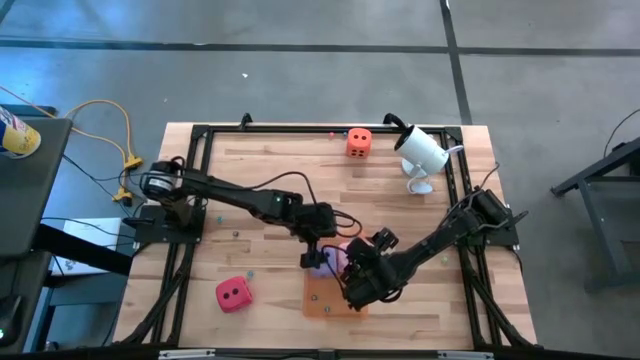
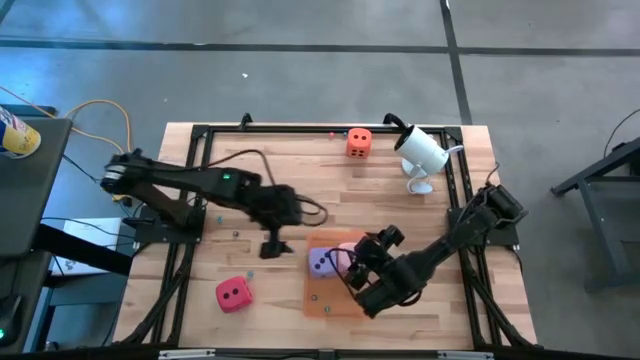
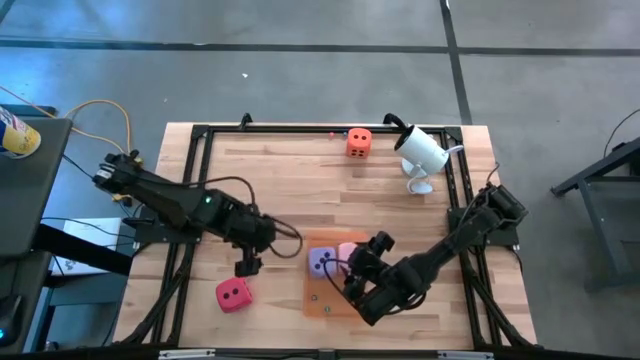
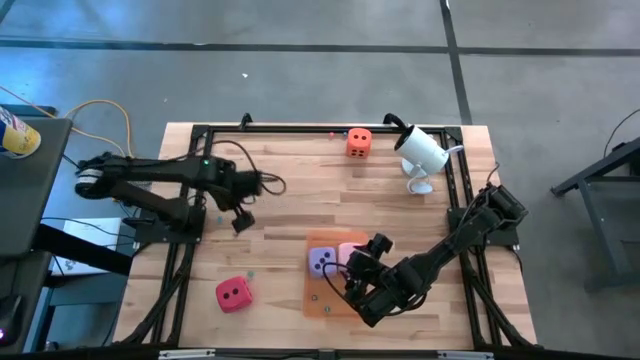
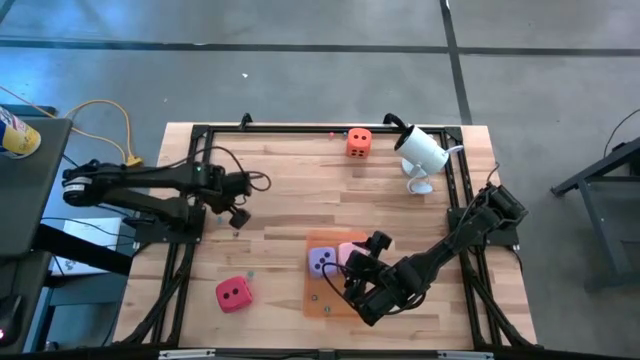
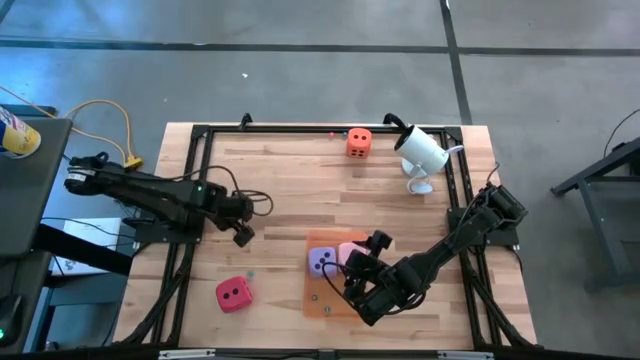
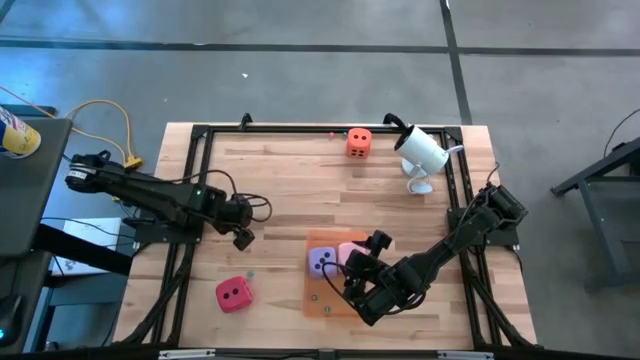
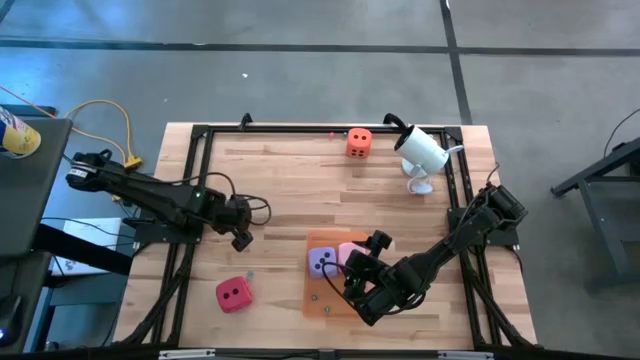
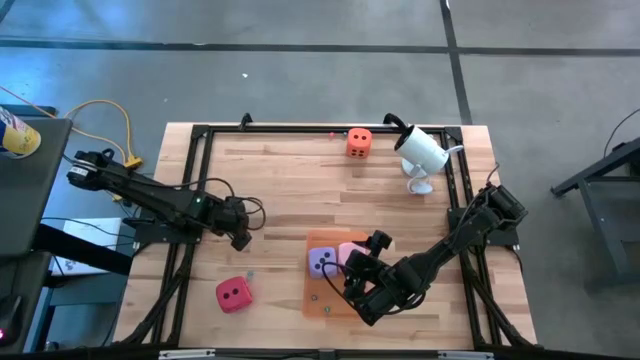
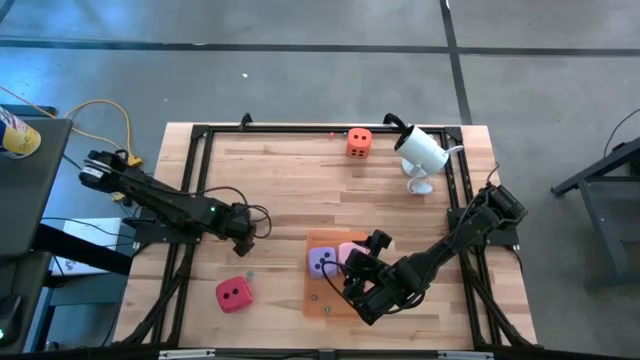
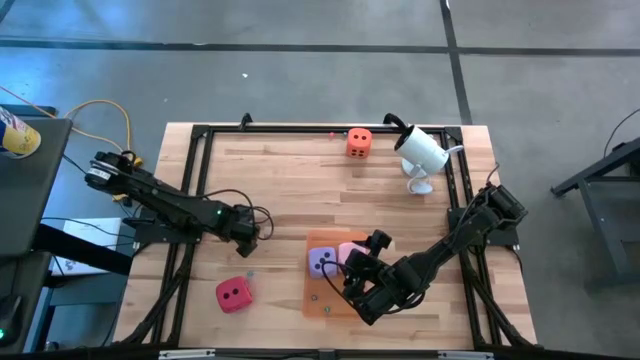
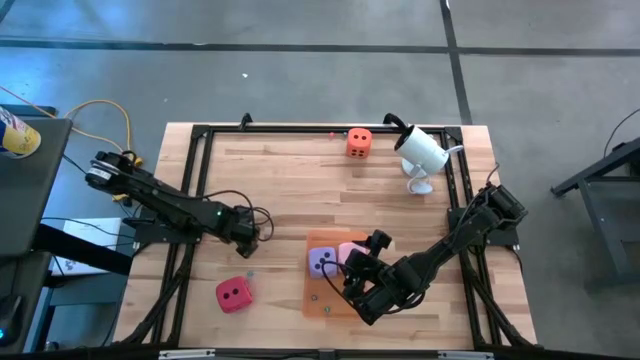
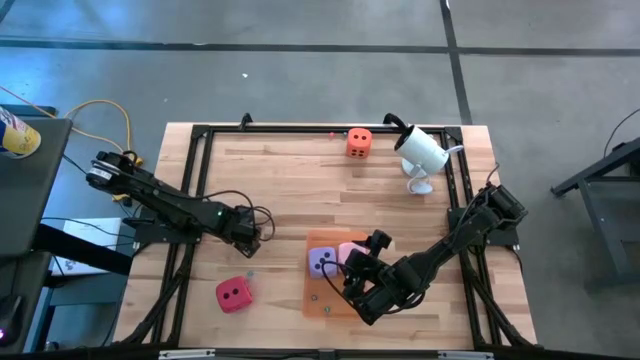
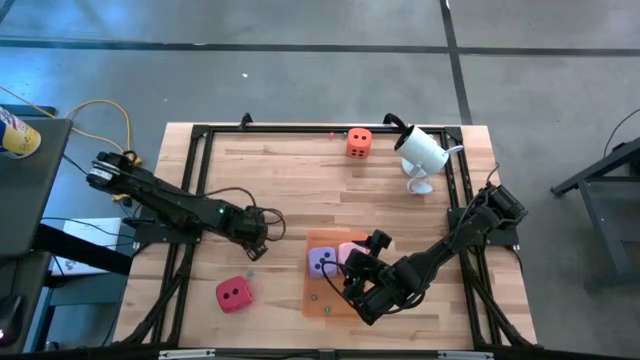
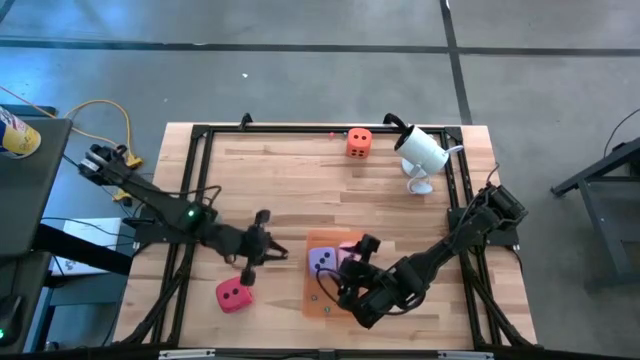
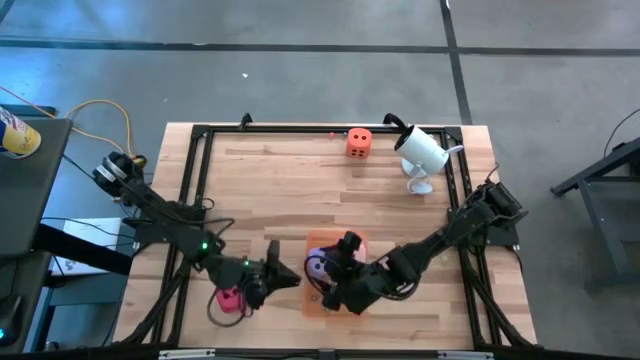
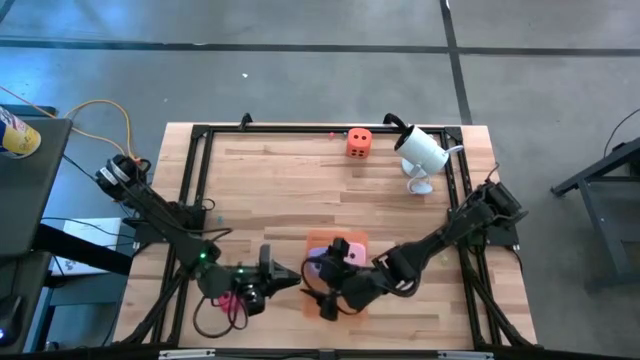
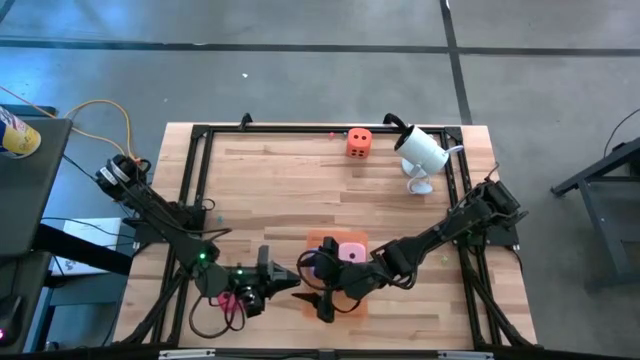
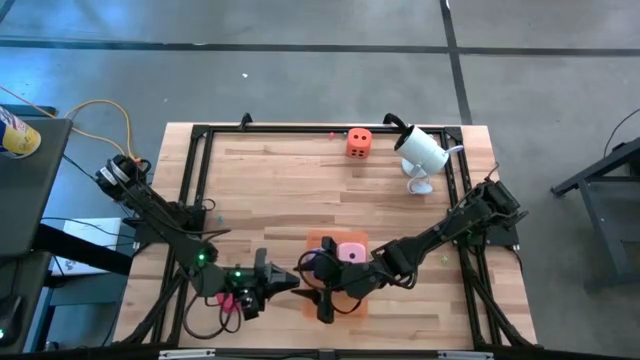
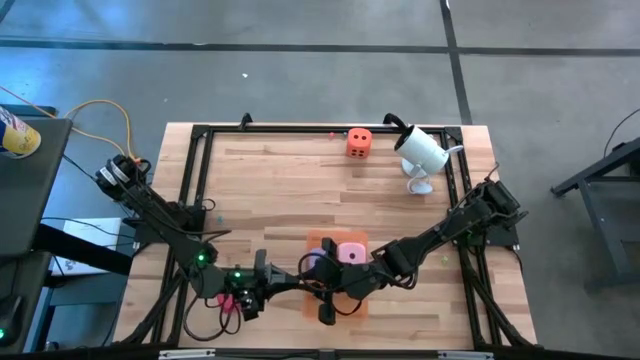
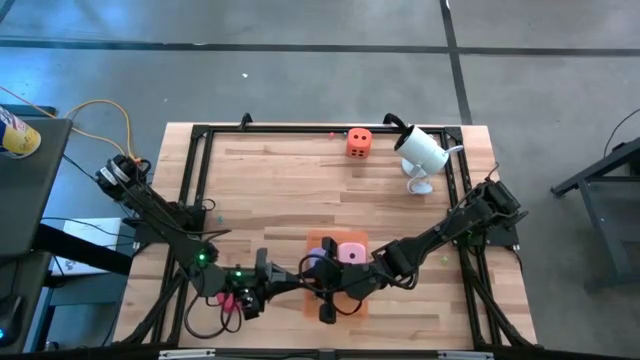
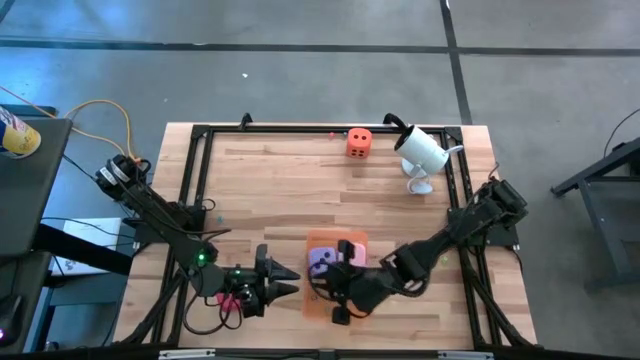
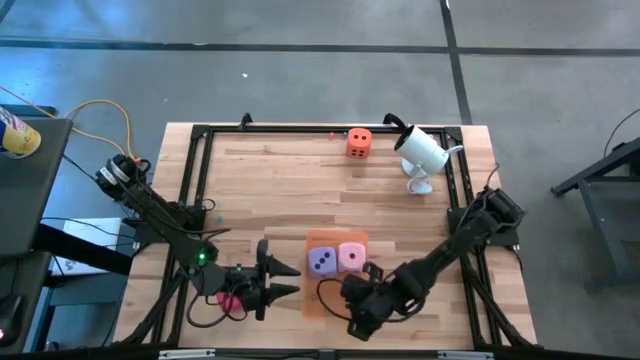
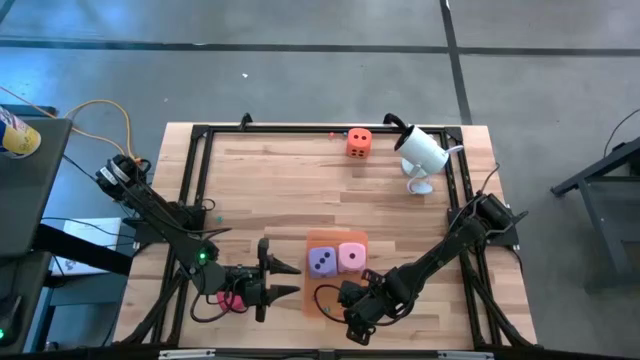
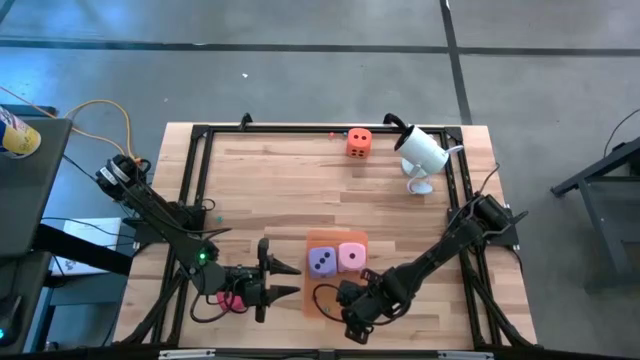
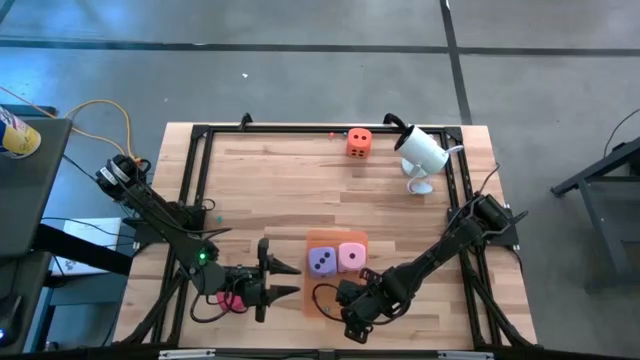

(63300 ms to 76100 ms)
Task: Pick & Place Dice
Put the small black dice into the orange bin

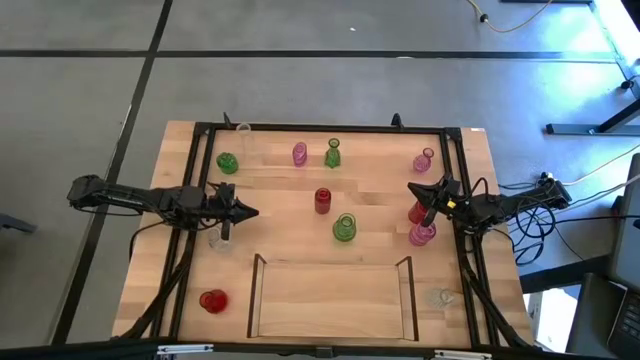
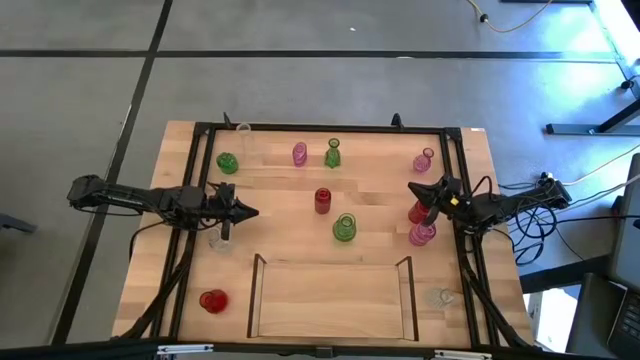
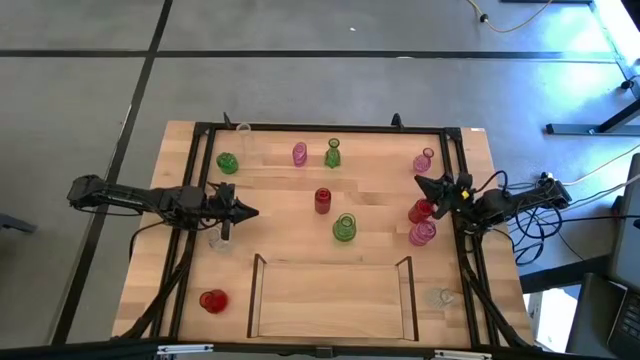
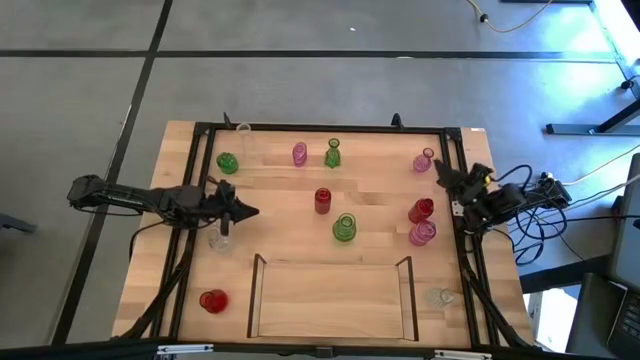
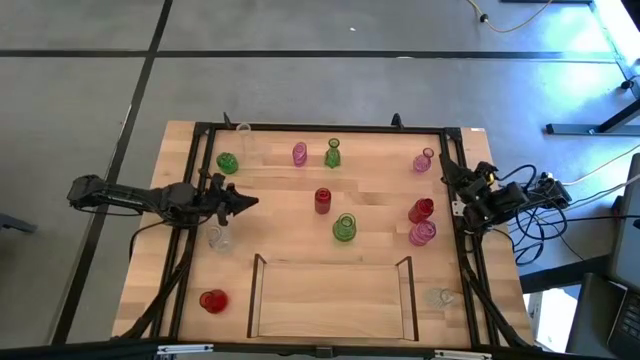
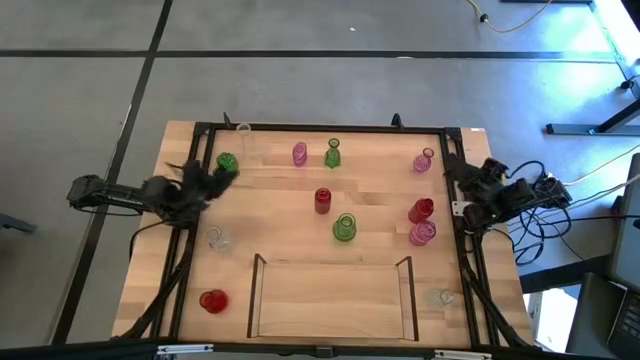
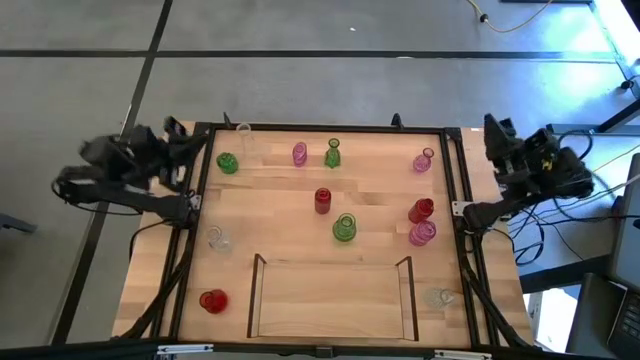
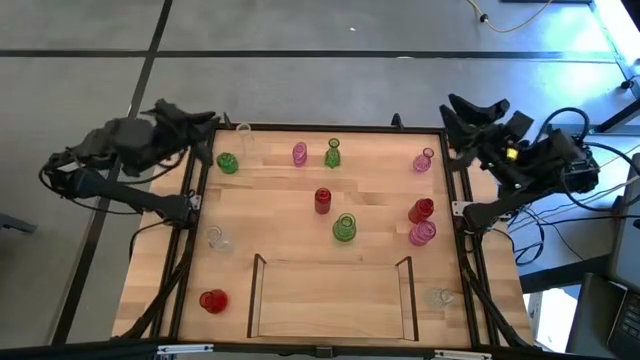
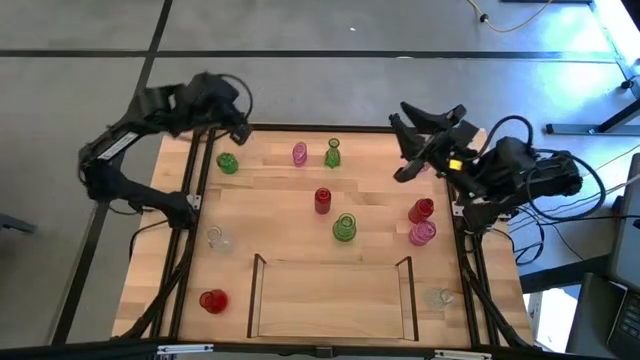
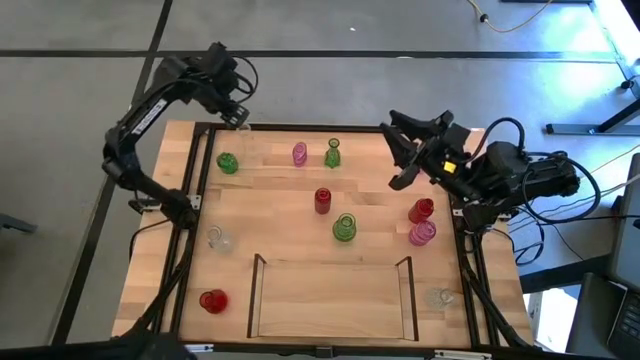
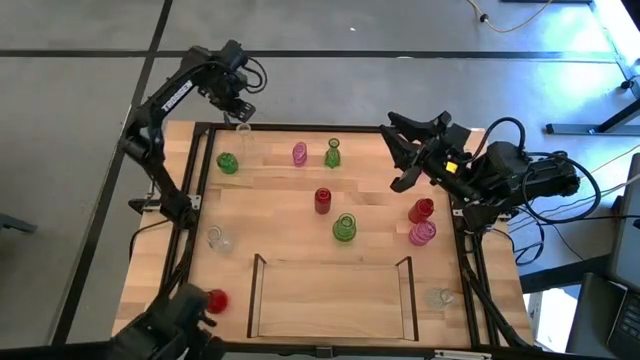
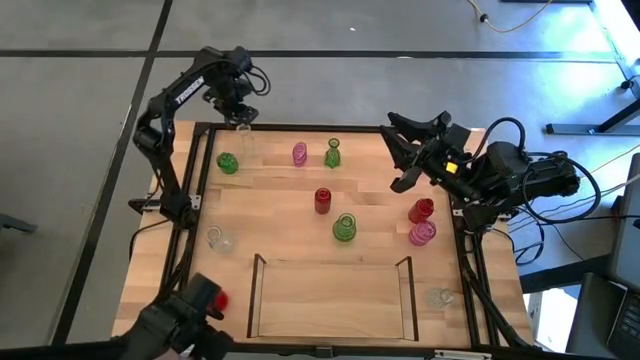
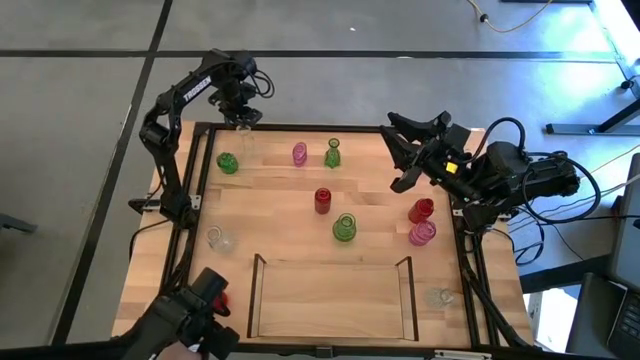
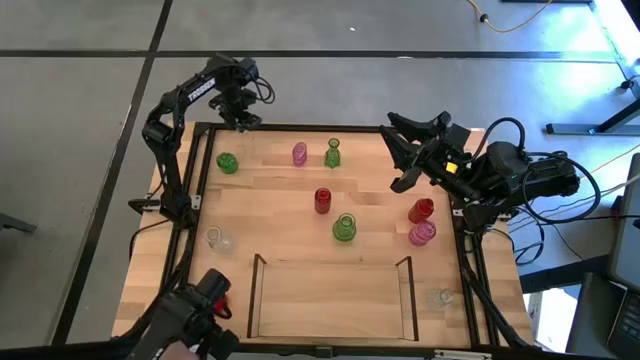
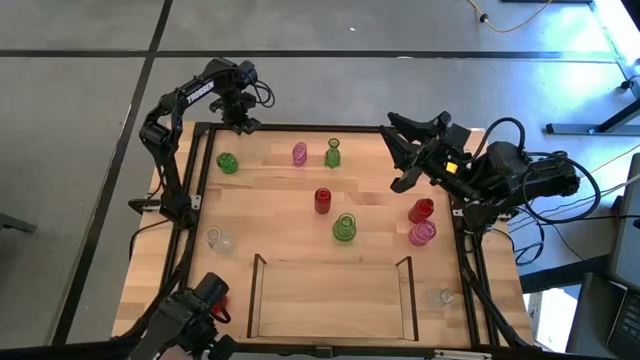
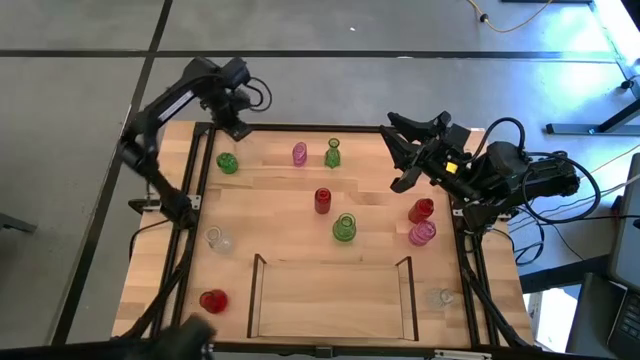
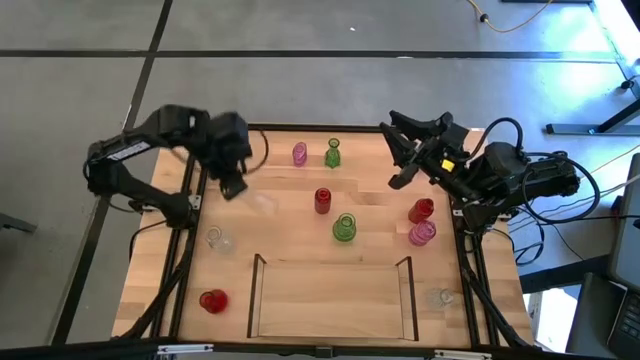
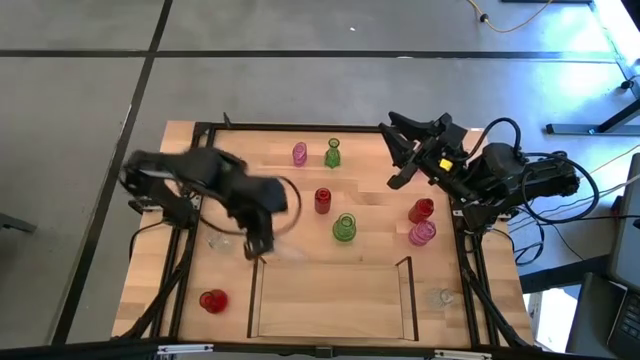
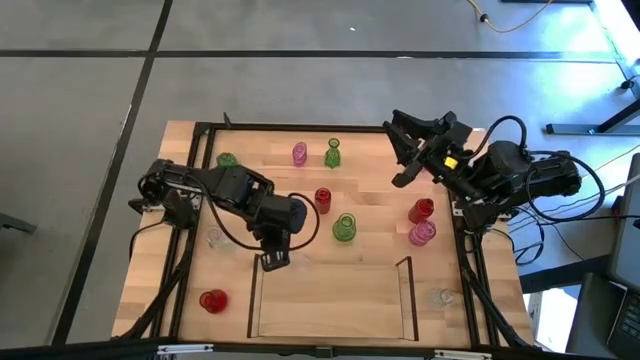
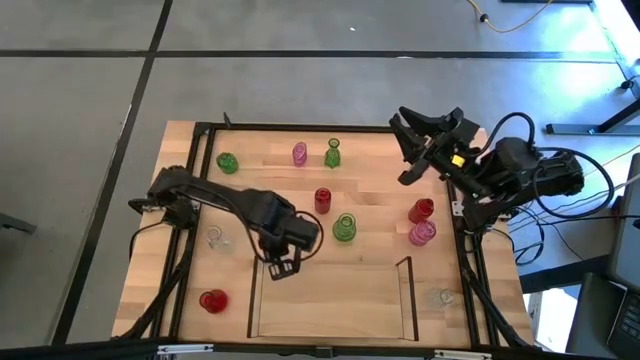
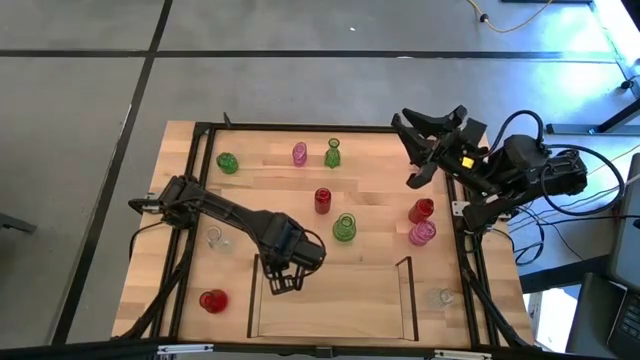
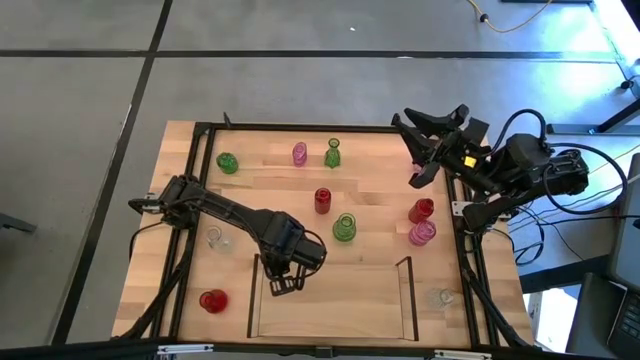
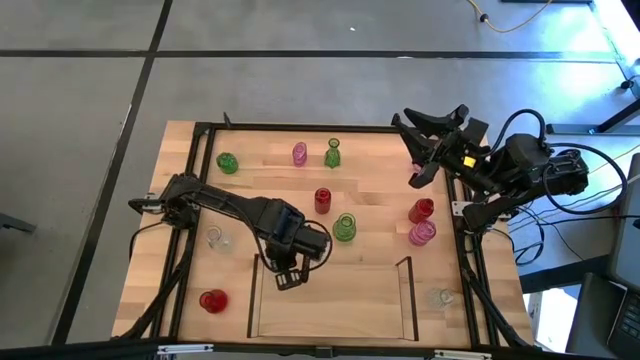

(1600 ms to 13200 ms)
Task: sort vases onto shelf
Put the top left transparent vase on the shelf
